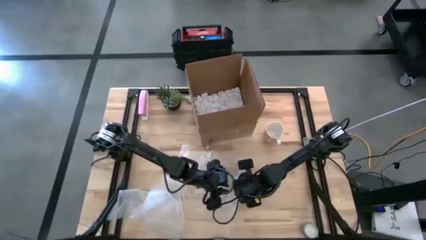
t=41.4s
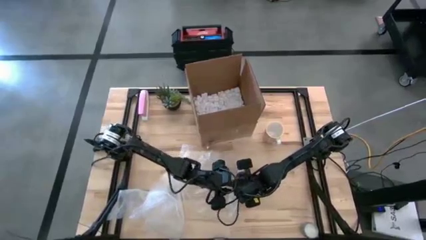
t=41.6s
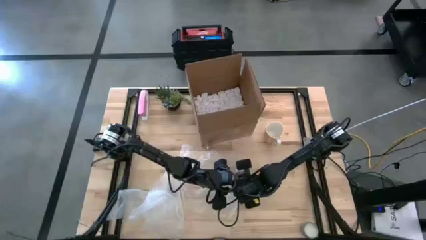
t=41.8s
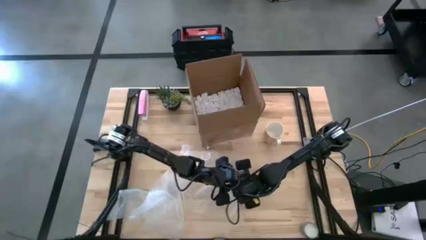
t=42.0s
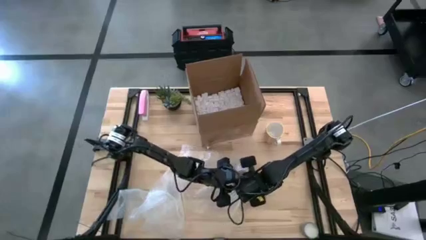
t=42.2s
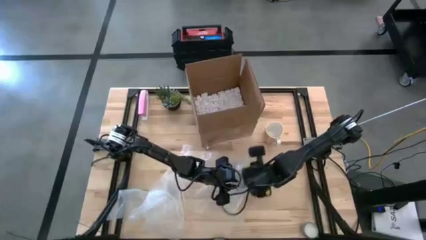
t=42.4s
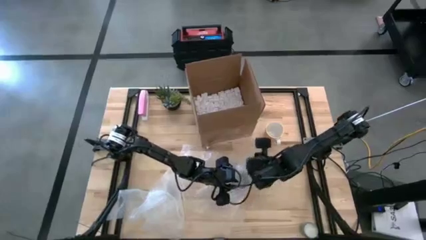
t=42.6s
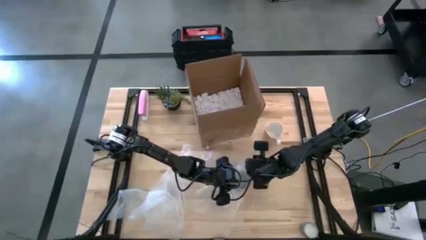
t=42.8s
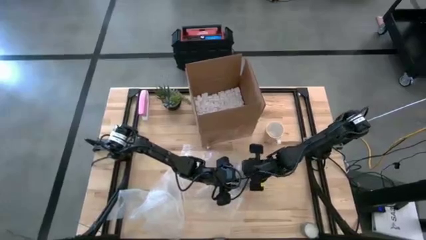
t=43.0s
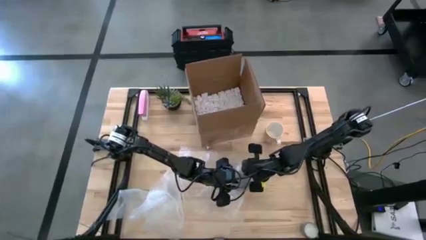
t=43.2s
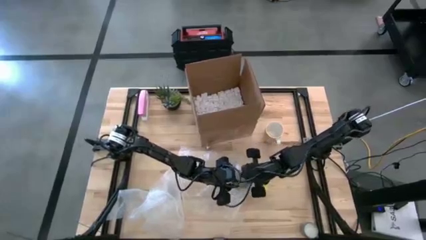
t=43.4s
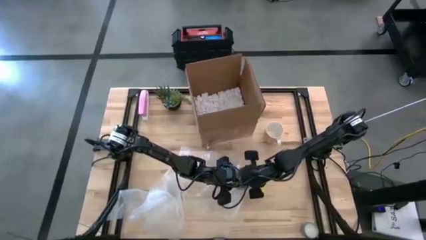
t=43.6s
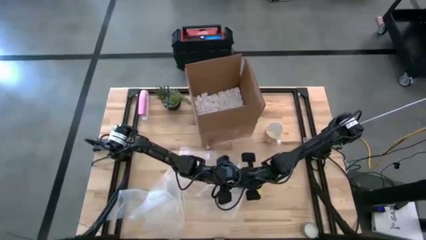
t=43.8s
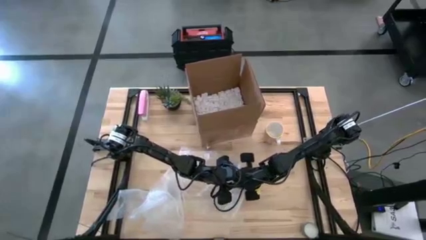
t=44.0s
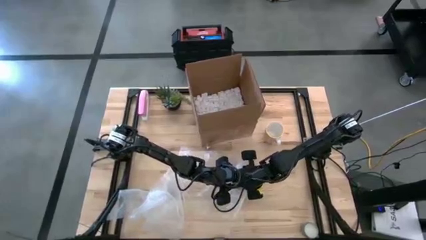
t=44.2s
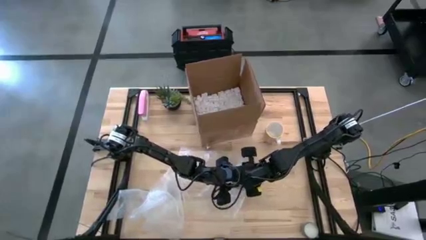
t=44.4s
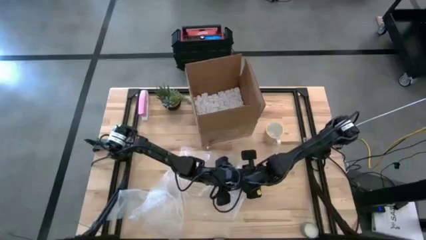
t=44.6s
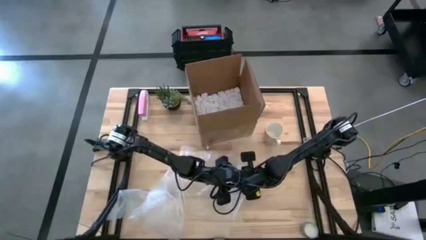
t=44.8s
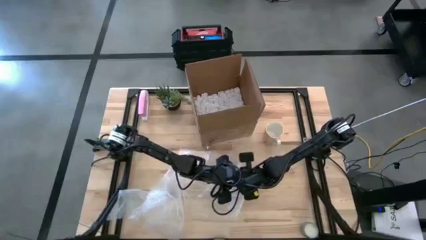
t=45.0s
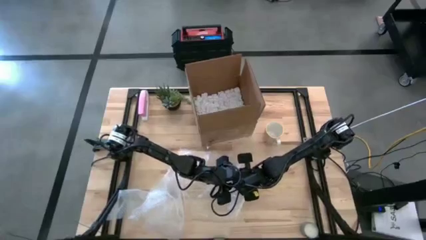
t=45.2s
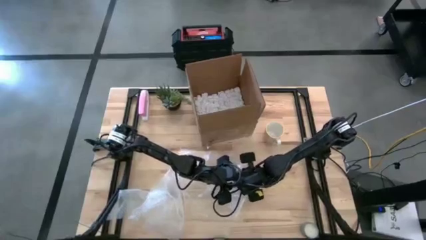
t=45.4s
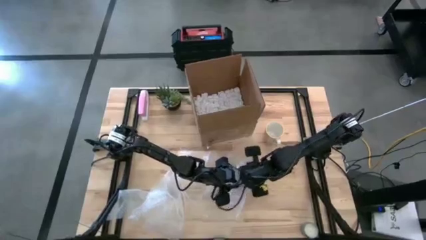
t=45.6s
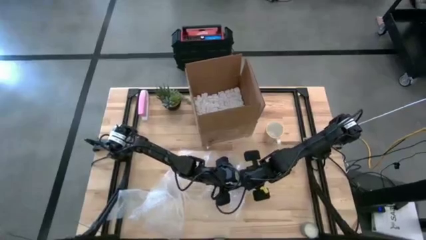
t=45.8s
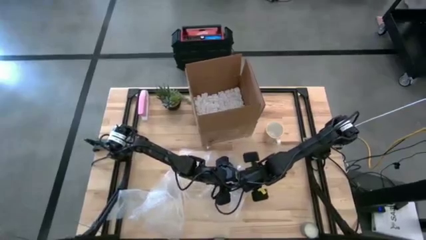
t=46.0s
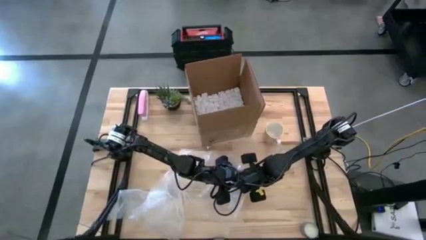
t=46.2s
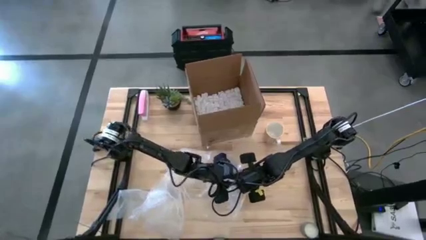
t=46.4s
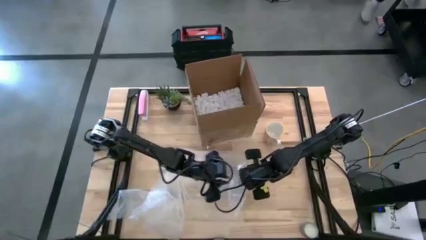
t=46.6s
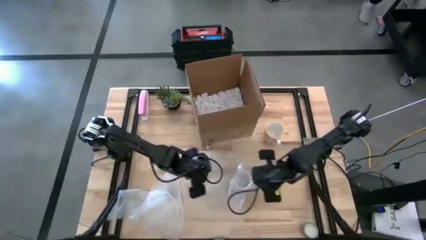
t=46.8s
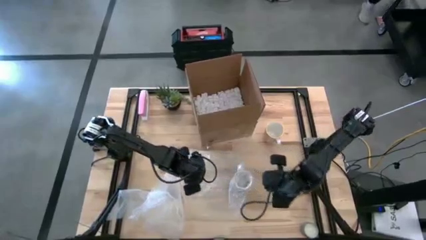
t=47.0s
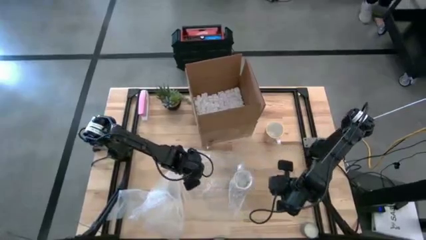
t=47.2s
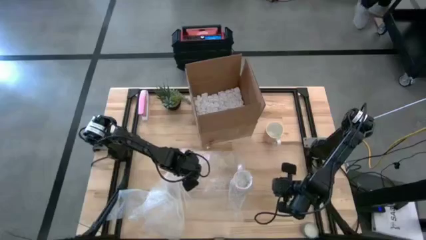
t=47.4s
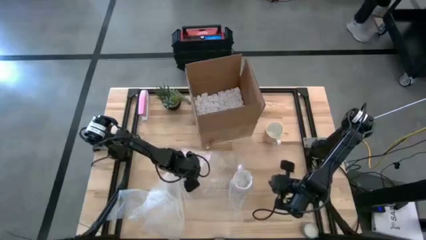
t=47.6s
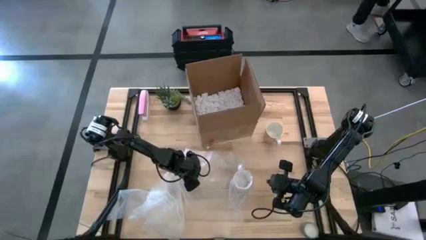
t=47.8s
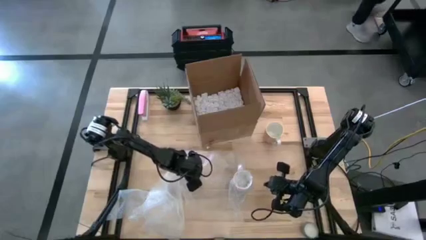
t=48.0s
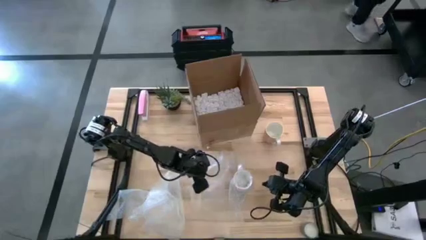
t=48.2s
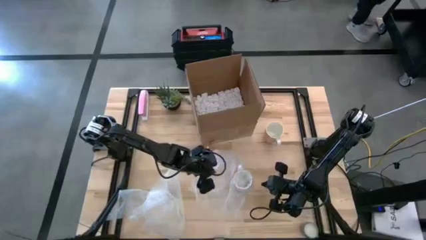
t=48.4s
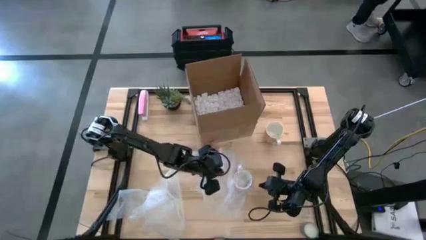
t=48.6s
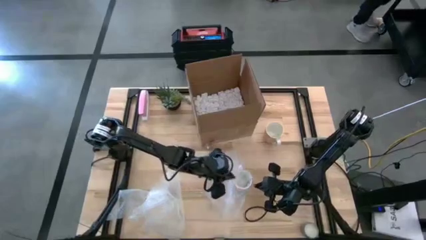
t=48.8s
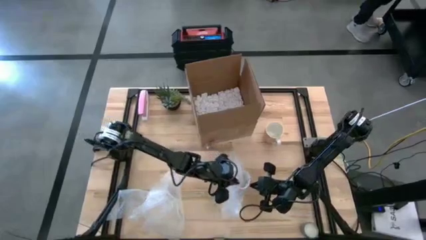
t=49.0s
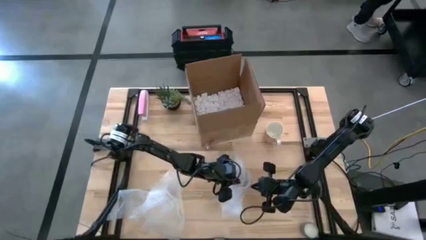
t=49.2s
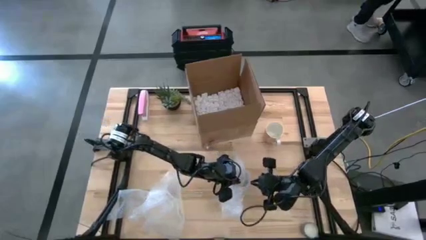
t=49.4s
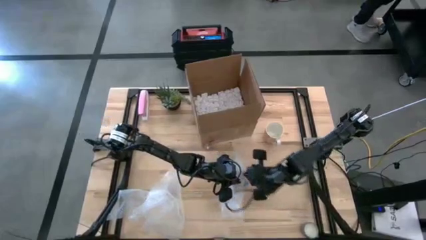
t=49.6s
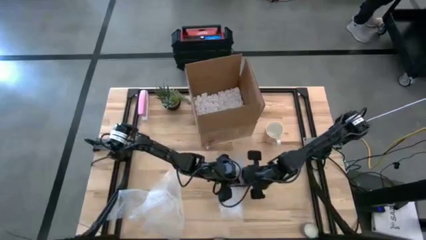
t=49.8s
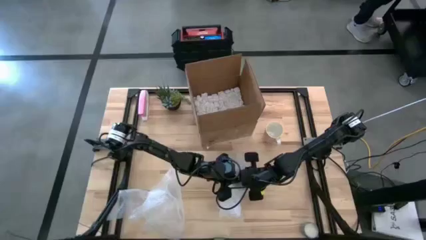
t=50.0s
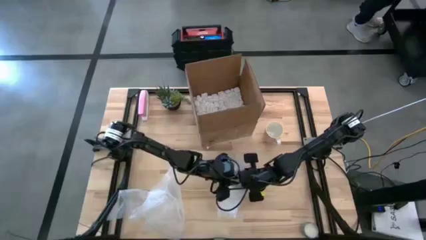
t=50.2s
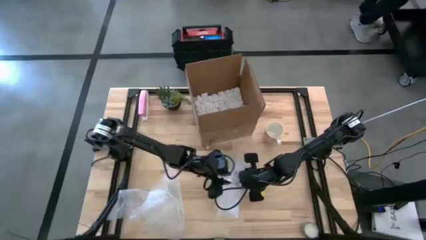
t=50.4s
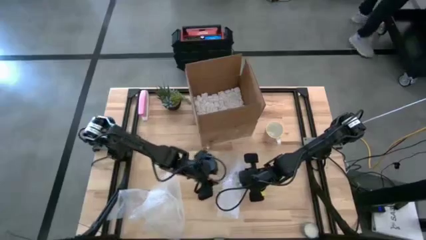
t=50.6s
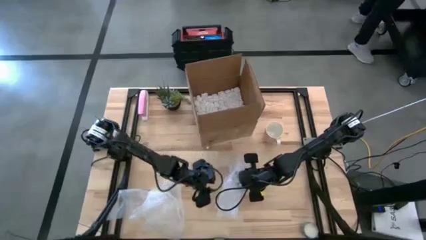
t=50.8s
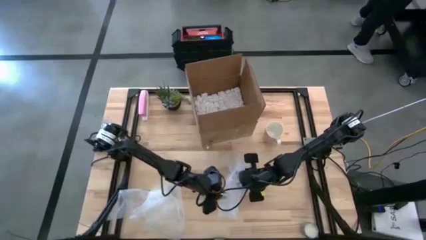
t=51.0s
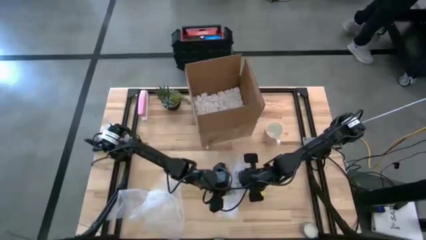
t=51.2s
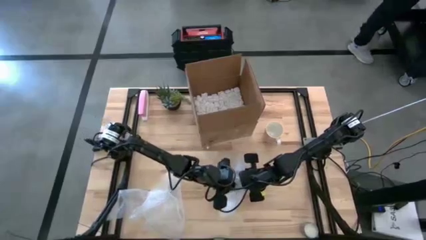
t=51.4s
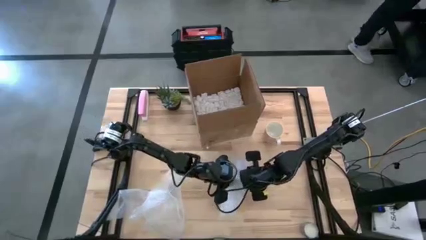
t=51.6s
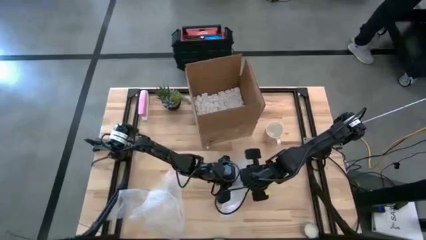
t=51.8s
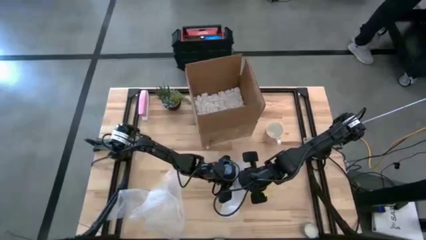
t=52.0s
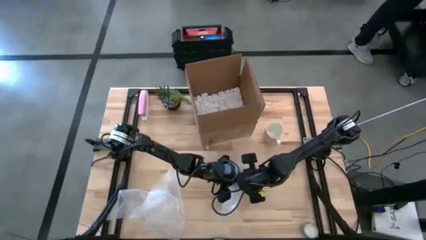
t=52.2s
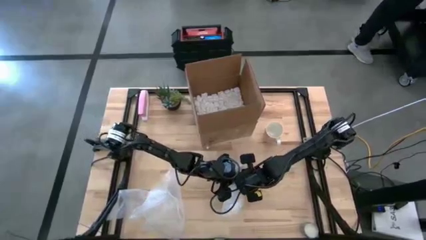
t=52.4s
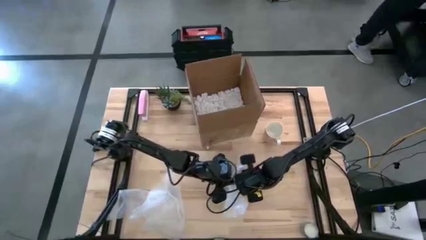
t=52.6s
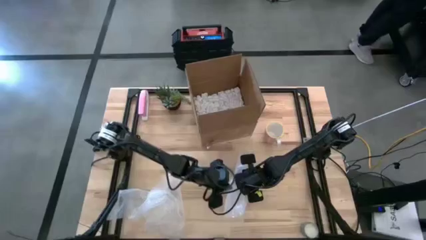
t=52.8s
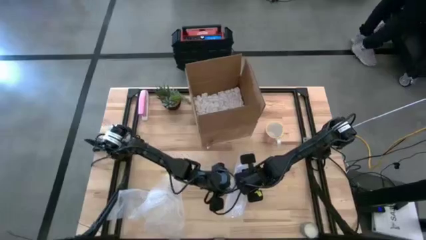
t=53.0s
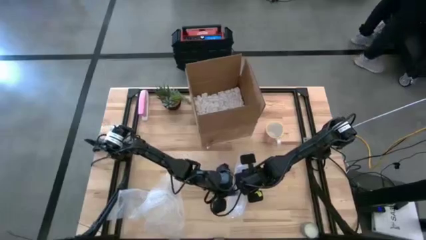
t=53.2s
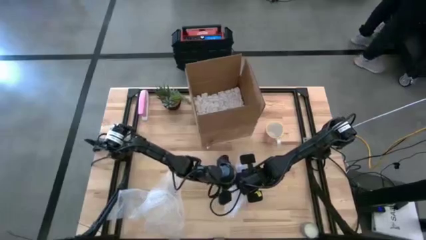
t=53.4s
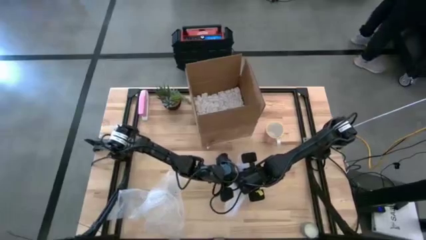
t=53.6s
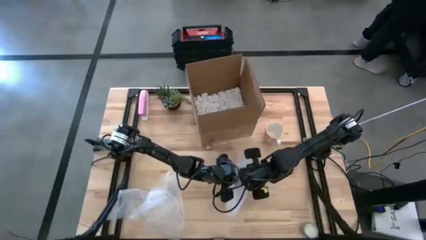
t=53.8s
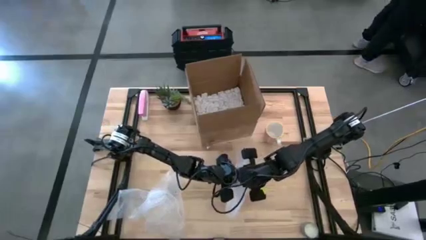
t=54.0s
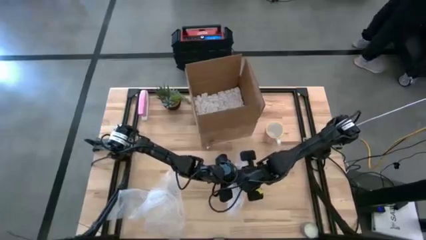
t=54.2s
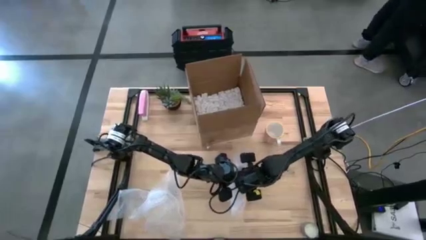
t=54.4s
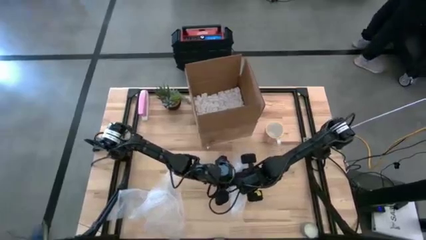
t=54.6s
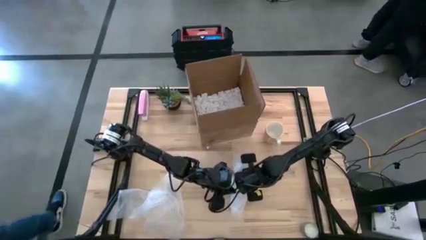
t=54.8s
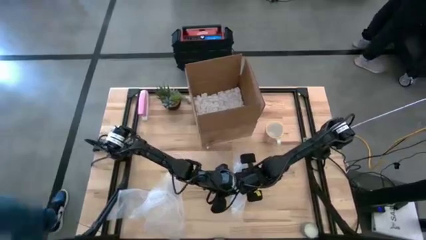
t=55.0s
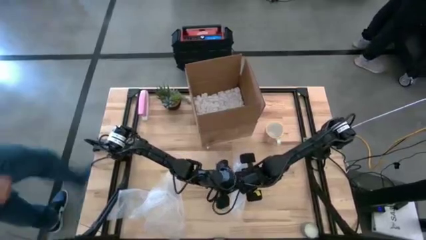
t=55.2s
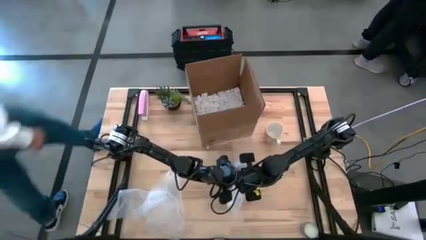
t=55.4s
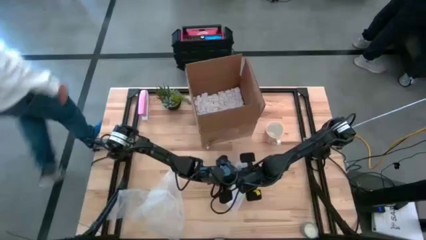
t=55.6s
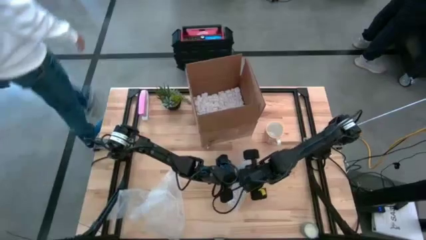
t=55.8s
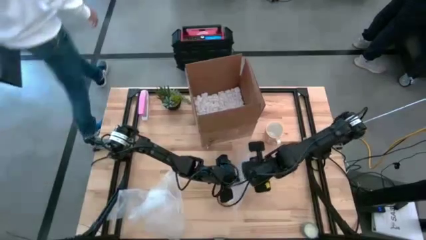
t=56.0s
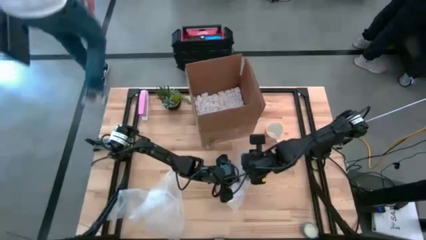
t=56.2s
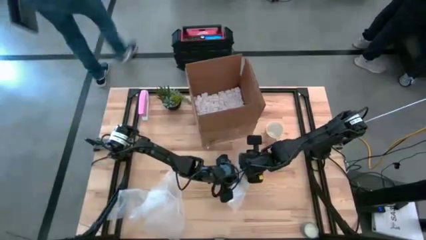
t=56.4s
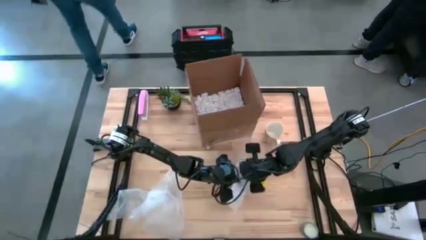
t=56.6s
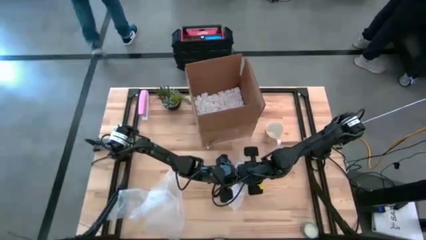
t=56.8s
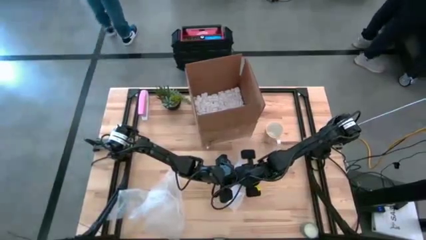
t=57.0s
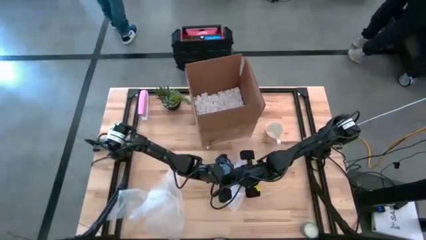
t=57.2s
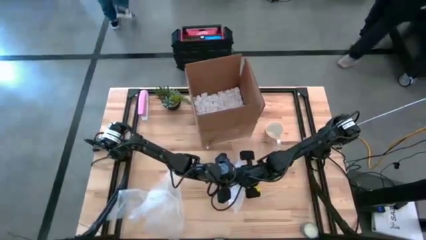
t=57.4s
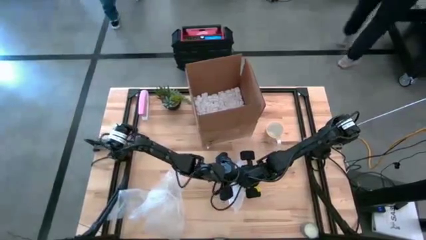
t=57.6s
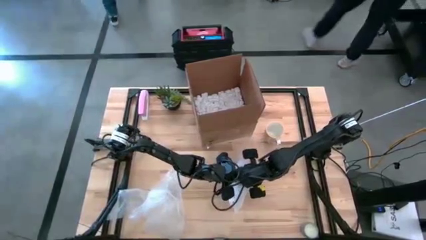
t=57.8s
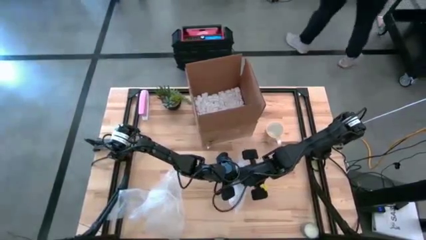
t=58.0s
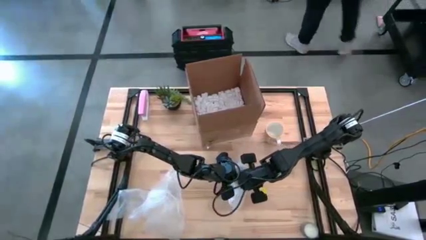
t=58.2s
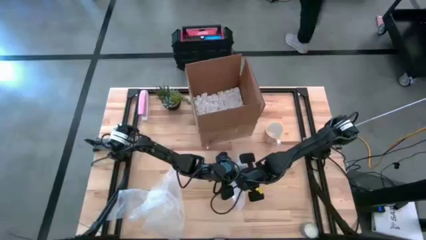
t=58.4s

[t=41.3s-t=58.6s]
Task: wrap mug
Wrap the gray mug with bubble wrap
